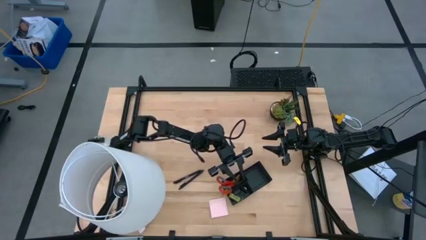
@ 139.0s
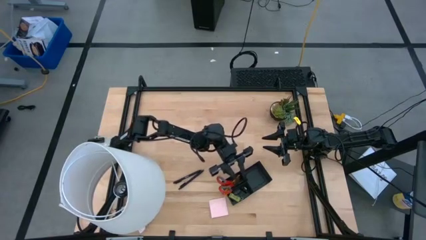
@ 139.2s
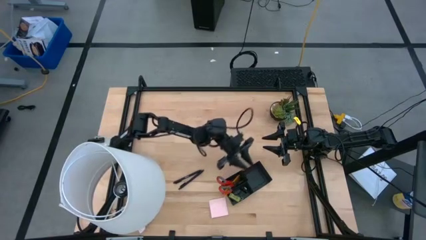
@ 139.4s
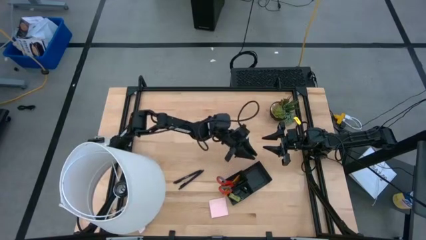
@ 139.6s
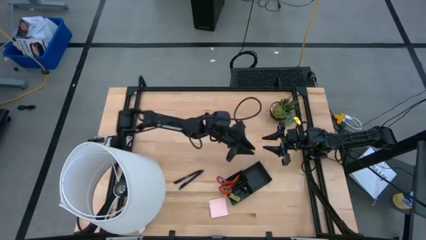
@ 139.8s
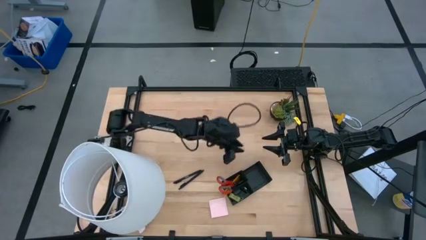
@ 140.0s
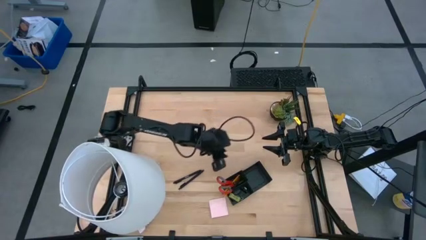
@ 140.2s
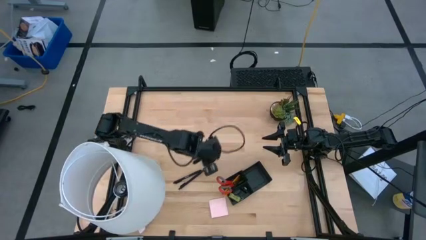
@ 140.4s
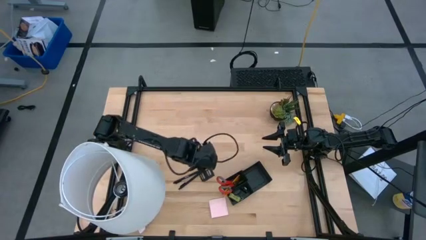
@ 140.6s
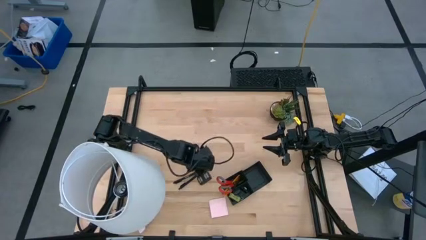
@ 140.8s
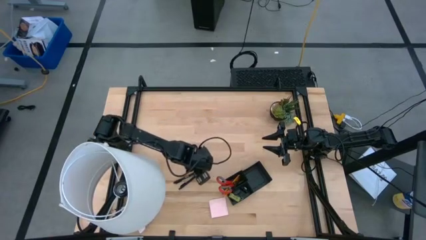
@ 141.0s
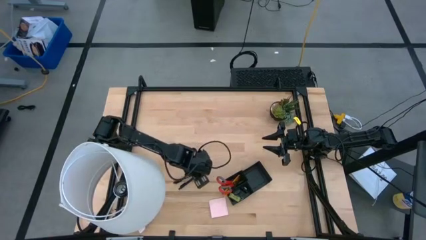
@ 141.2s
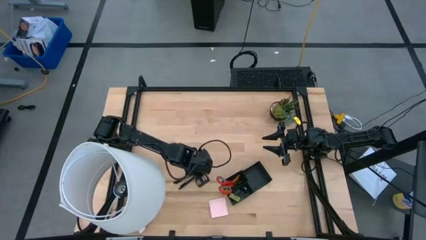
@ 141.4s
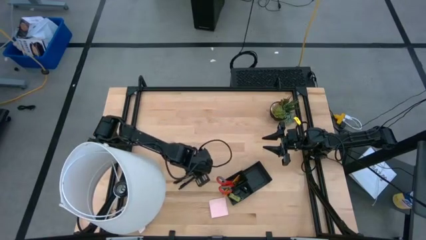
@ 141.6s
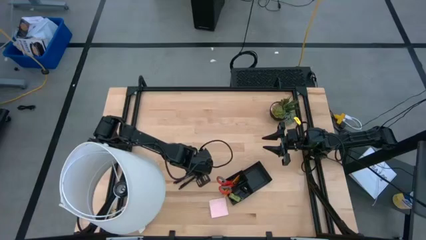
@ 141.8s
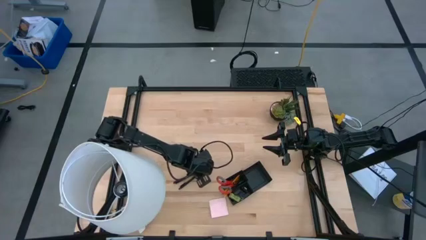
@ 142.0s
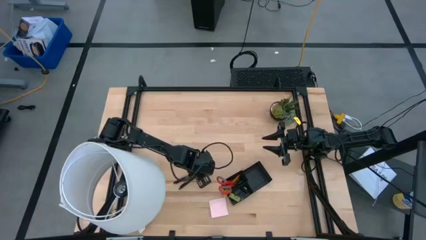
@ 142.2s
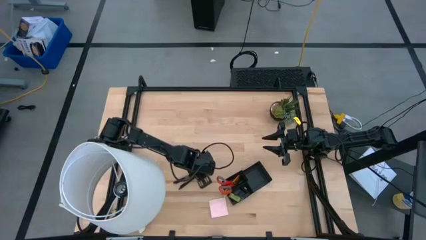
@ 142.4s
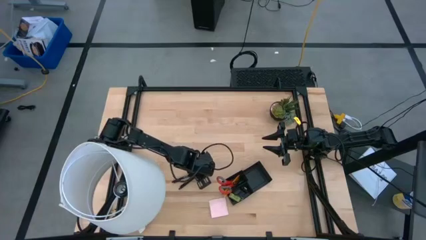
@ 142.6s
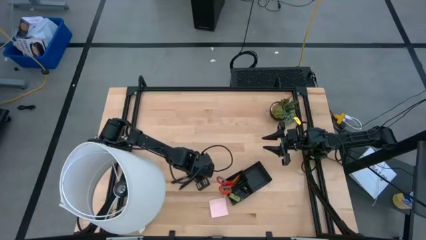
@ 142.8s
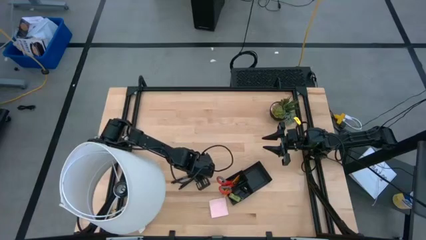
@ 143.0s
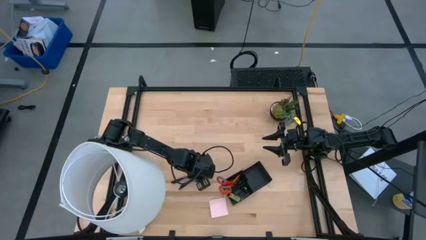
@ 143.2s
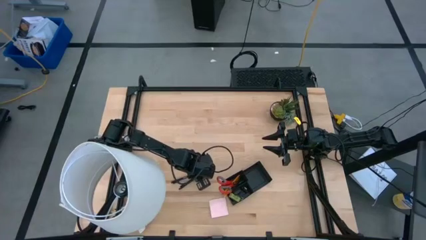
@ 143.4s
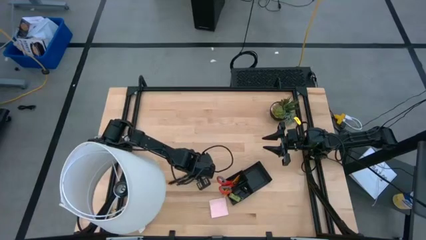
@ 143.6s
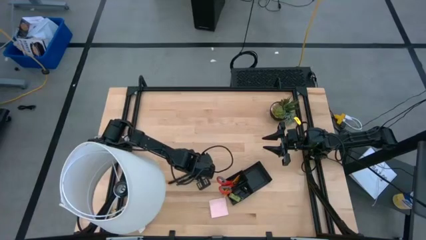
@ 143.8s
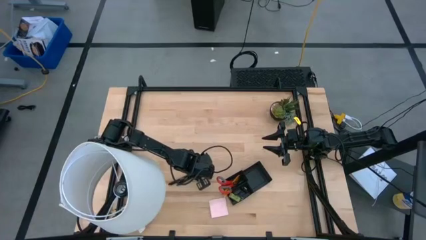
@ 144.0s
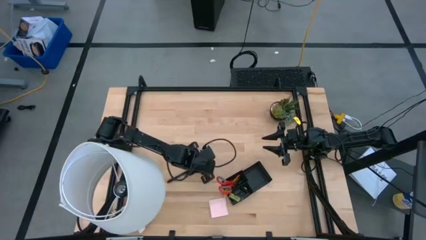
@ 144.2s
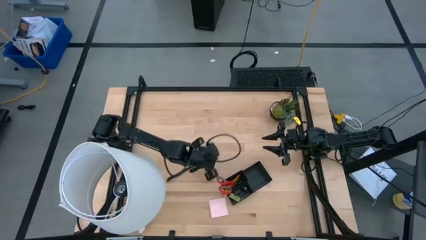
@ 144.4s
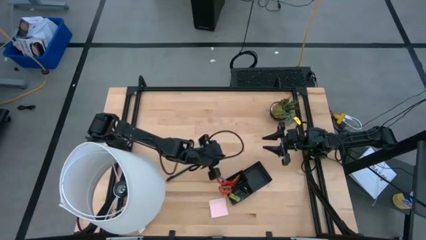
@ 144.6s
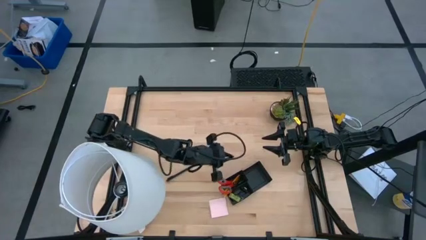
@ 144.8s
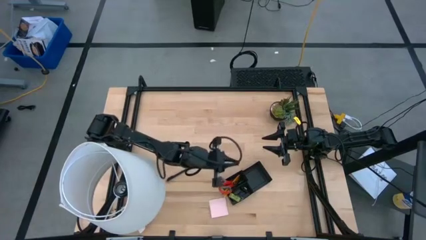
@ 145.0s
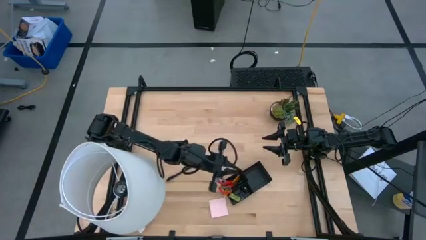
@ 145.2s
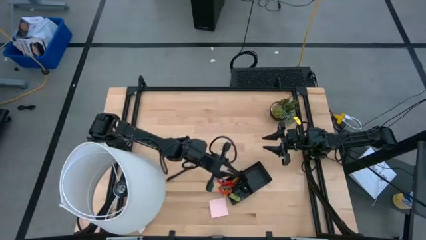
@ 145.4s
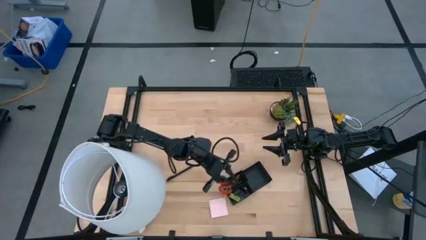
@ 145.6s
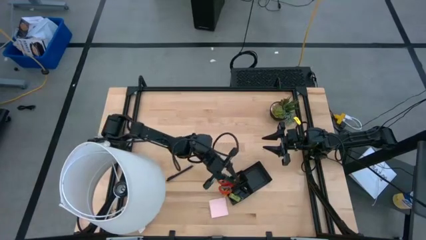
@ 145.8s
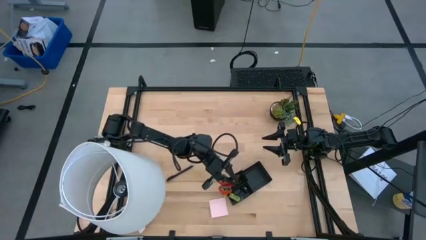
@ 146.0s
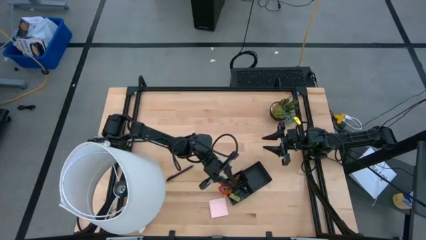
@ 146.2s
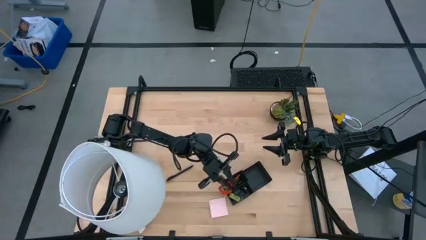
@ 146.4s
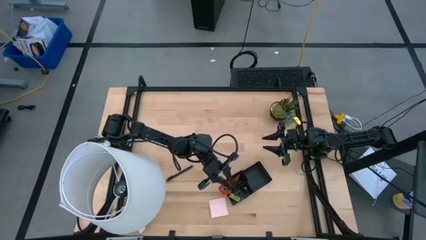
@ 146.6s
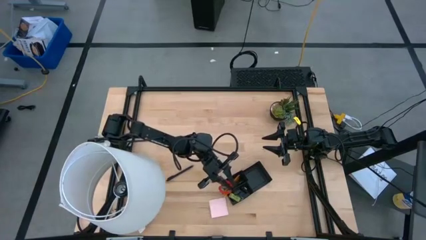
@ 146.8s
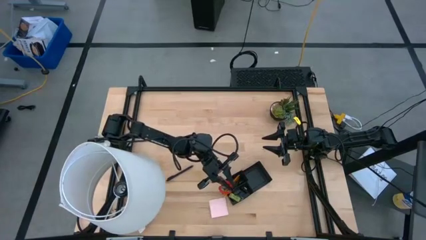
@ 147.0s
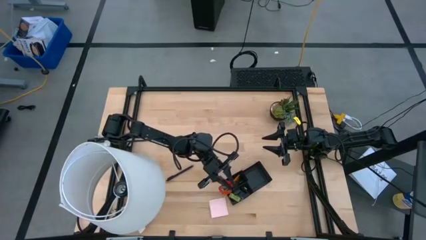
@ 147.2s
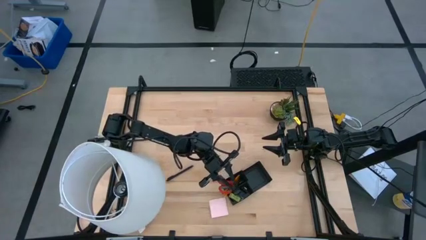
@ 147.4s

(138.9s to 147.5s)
Task: Pick and place office supplies into organizer
Put the black pen into the black desk organizer

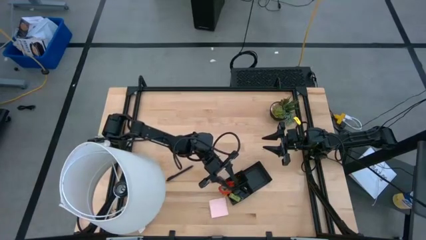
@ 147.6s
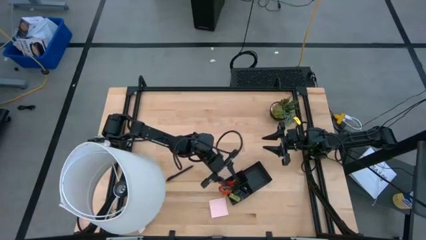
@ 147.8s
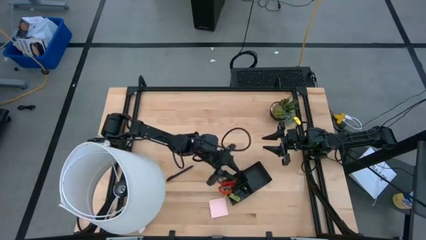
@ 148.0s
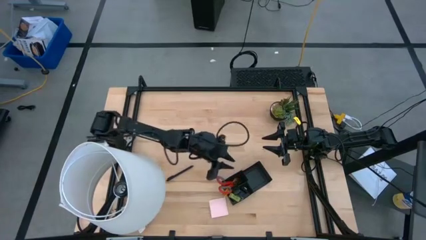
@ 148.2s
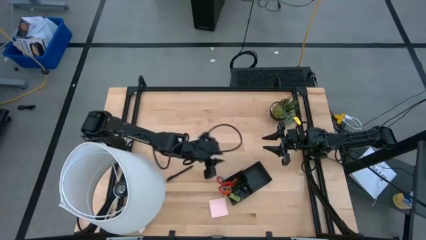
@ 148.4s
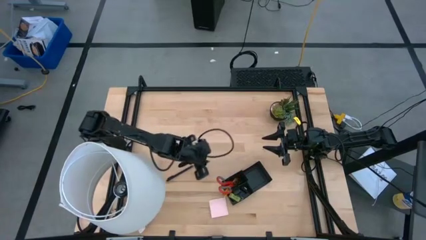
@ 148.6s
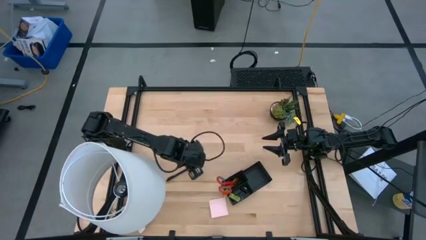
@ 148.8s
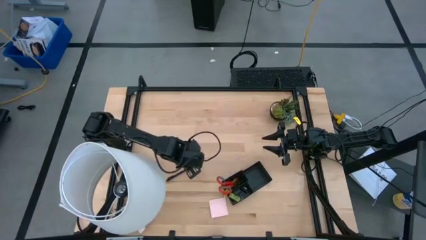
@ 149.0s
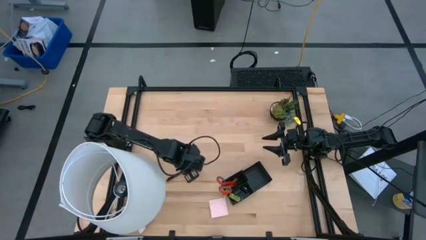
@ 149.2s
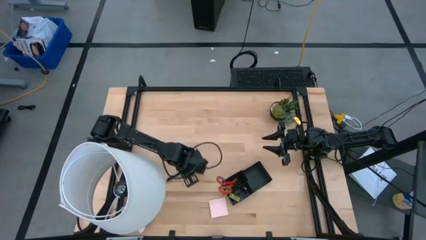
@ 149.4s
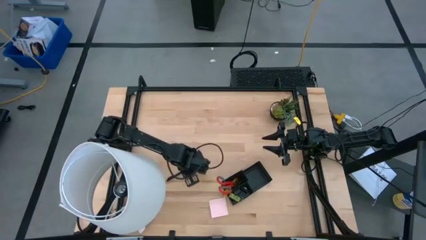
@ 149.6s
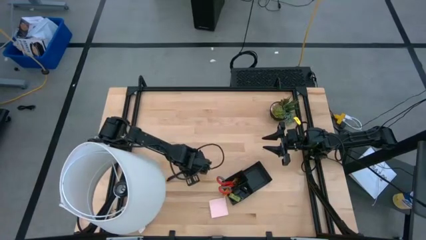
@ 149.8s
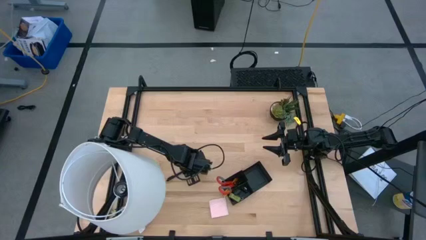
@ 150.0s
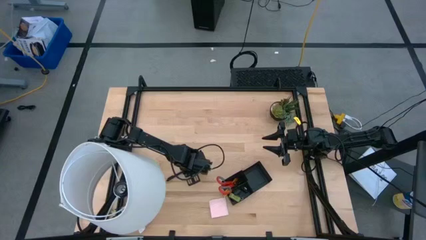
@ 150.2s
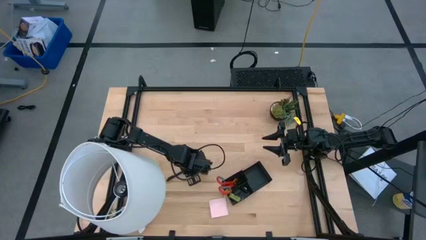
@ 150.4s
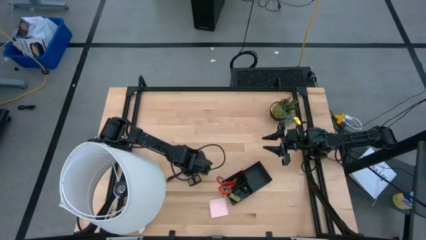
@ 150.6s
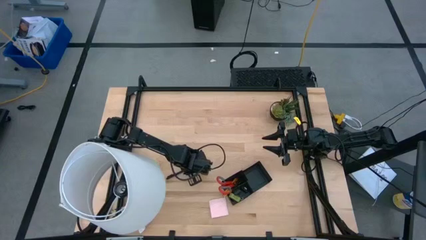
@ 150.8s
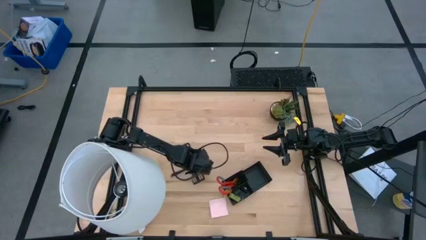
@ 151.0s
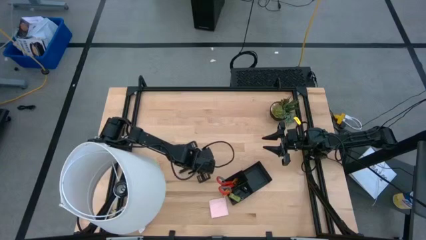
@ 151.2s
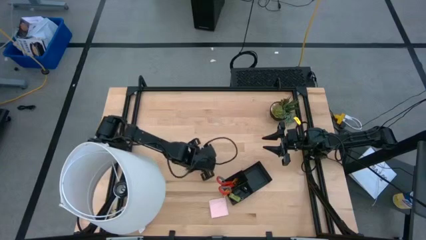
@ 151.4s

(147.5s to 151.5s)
Put the black pen into the black desk organizer

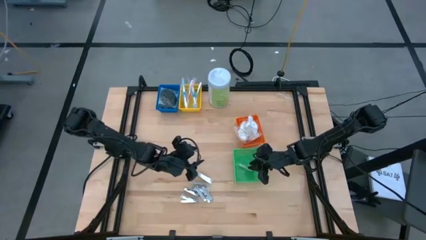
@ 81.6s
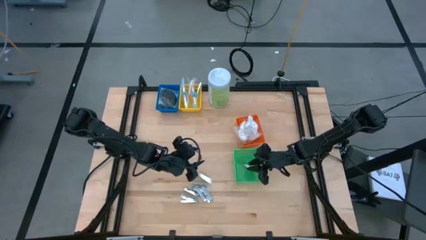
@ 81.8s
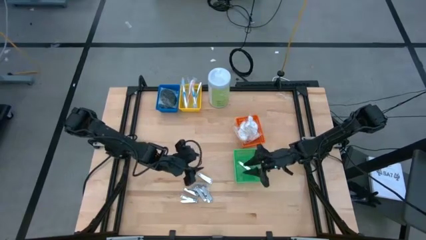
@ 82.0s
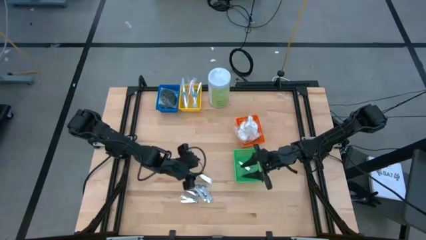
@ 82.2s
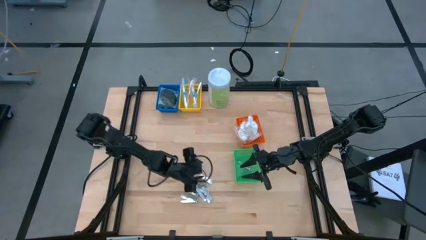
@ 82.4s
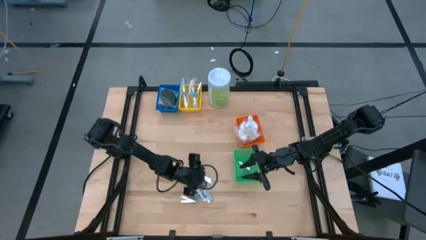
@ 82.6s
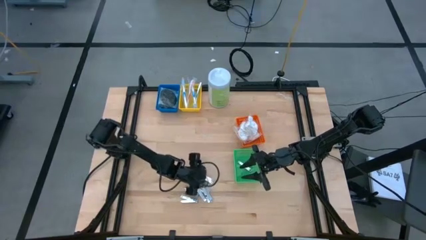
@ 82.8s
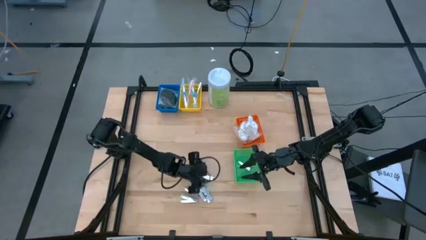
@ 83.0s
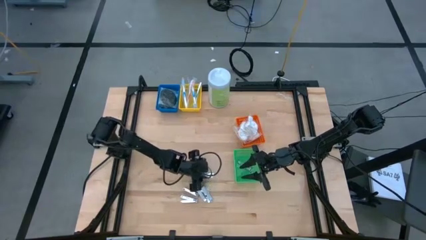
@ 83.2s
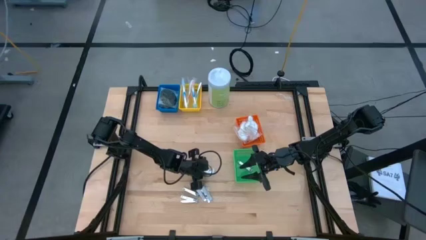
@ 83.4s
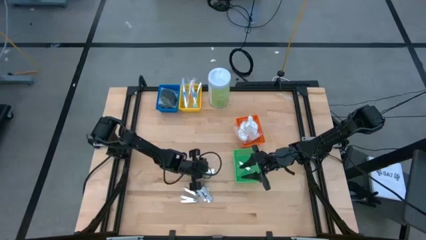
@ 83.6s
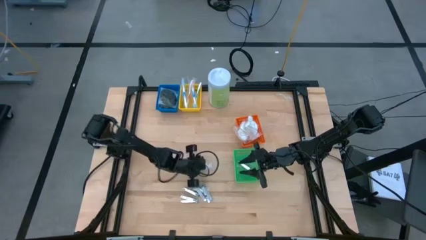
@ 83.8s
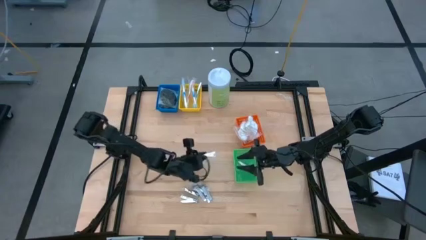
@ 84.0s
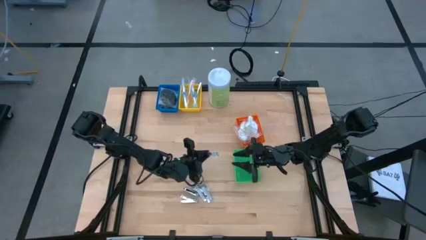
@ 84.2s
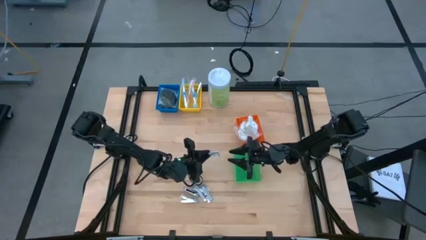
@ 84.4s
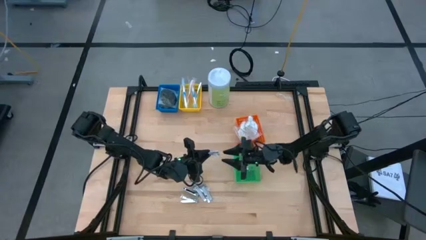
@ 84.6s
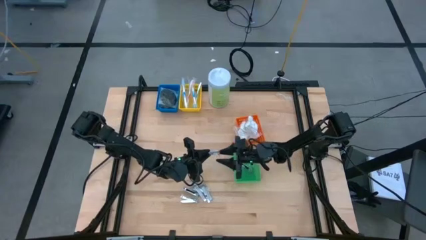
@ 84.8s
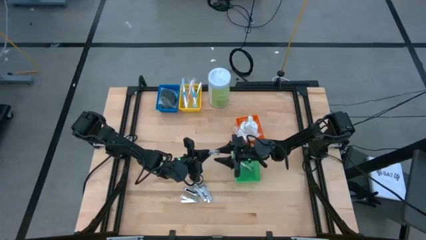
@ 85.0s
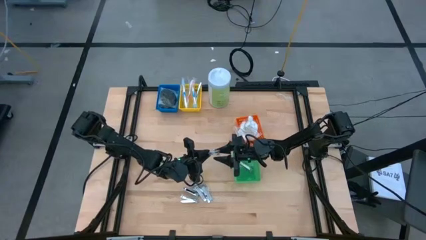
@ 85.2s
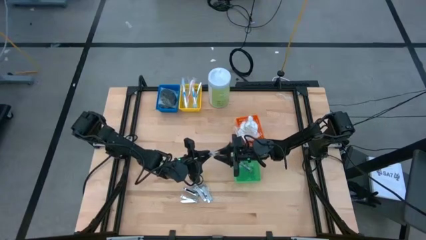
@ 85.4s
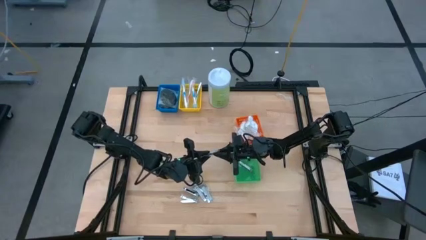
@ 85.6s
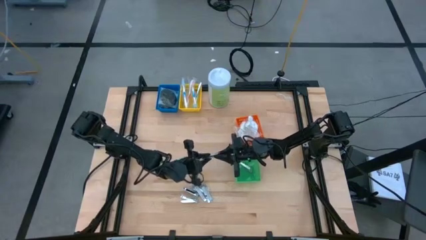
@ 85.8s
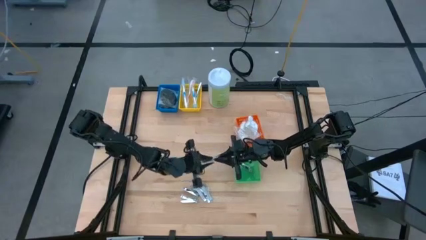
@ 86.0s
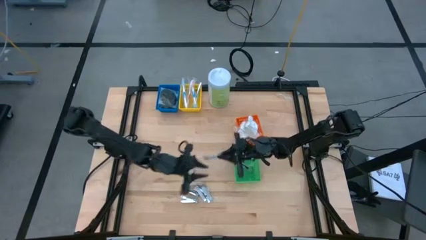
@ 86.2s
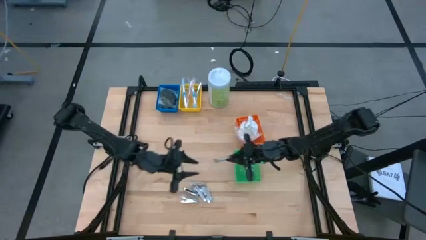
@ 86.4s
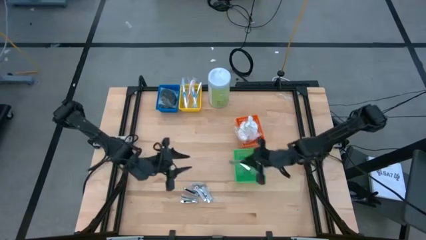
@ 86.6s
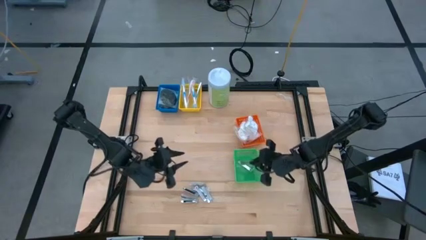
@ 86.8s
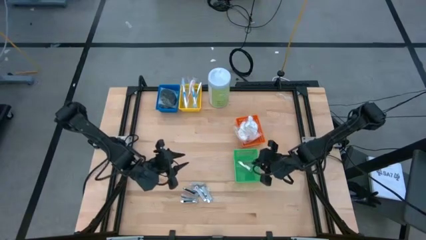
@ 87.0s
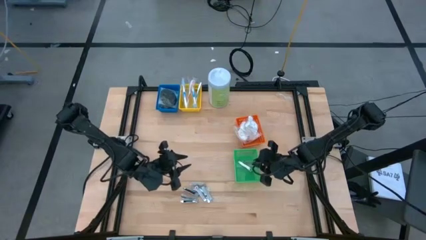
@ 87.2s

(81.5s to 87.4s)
Task: Pick & Place Travel size toiletries
Put the nail cutter into the green bin
